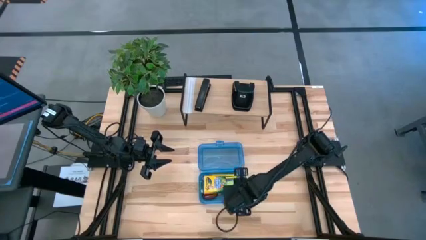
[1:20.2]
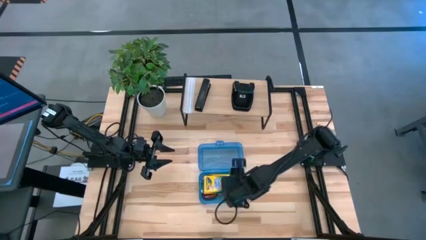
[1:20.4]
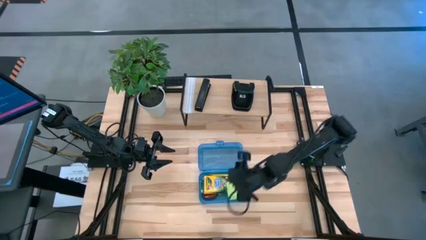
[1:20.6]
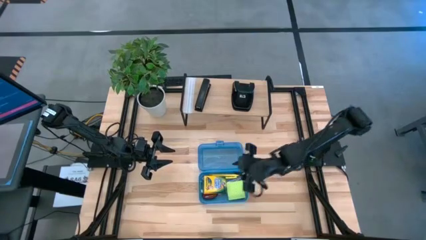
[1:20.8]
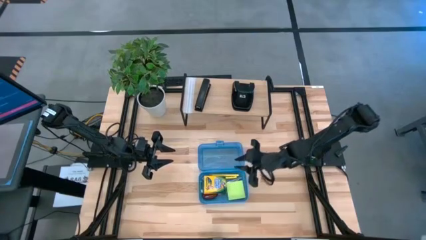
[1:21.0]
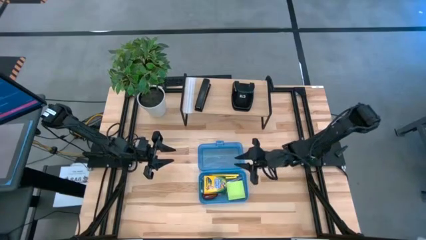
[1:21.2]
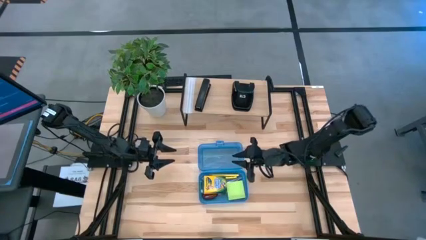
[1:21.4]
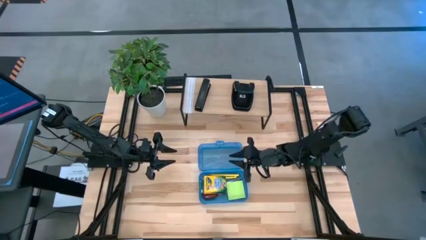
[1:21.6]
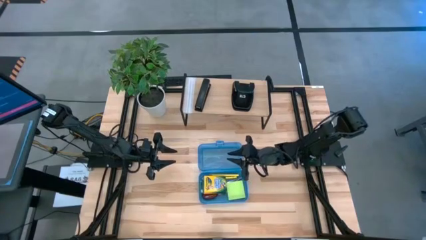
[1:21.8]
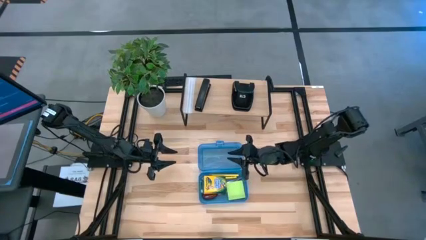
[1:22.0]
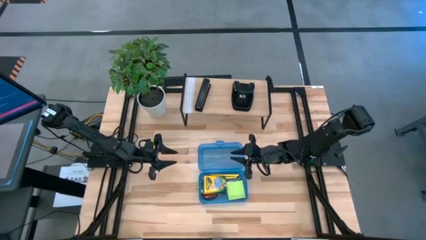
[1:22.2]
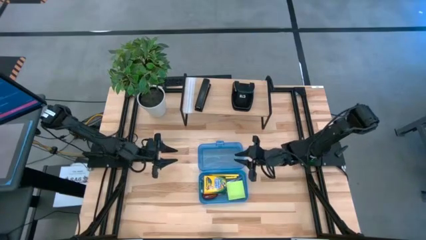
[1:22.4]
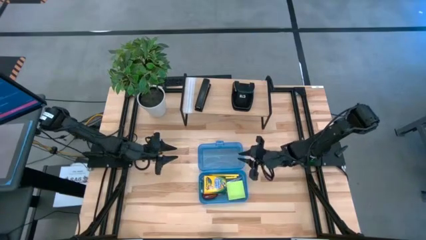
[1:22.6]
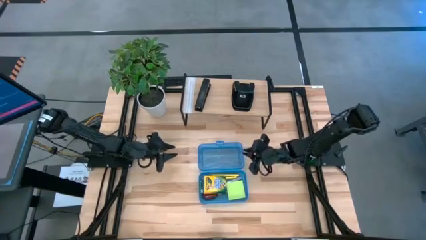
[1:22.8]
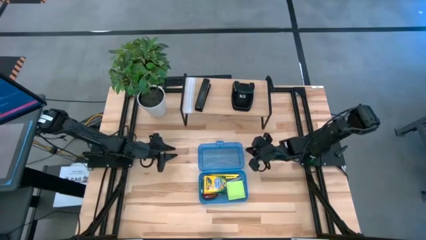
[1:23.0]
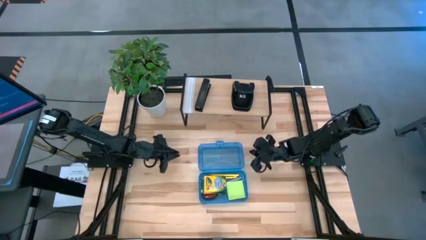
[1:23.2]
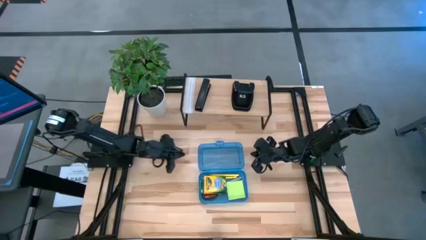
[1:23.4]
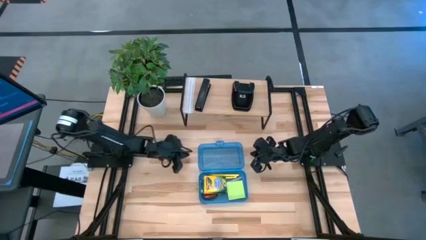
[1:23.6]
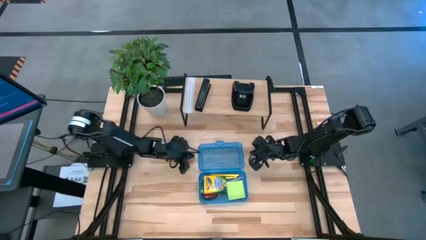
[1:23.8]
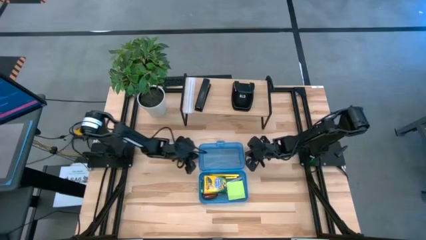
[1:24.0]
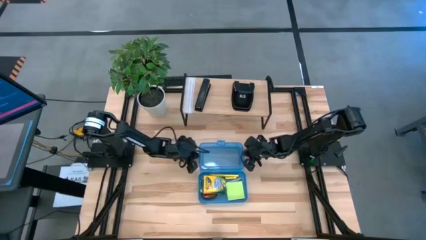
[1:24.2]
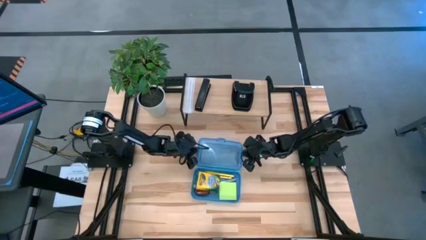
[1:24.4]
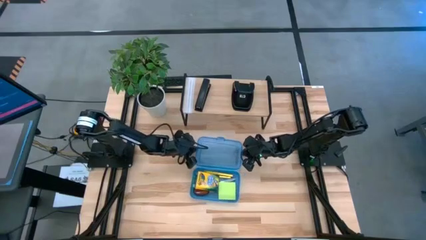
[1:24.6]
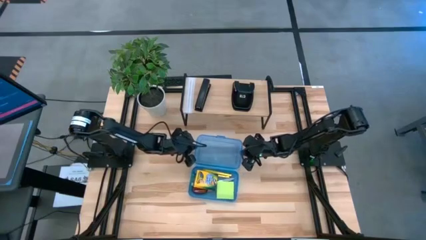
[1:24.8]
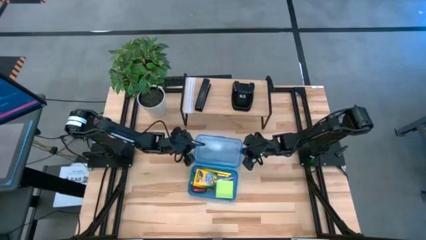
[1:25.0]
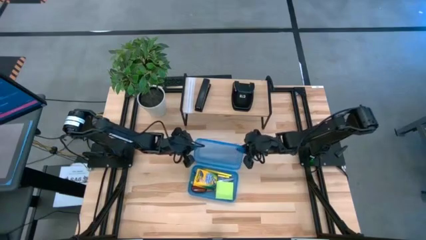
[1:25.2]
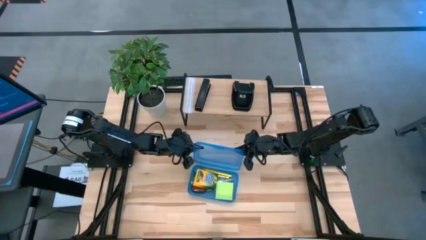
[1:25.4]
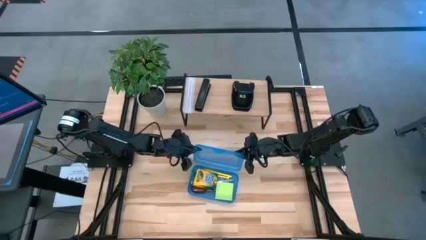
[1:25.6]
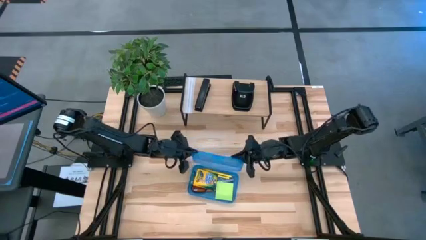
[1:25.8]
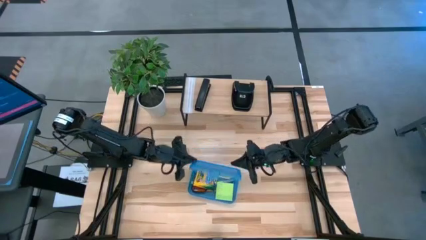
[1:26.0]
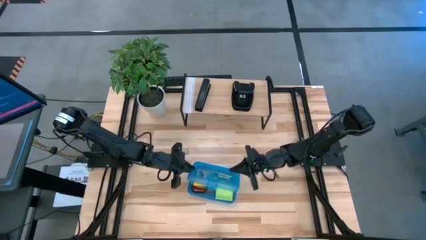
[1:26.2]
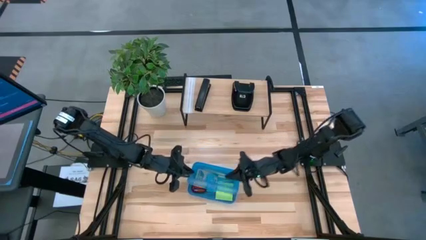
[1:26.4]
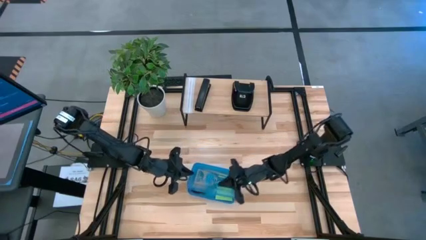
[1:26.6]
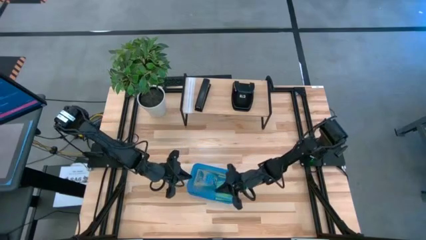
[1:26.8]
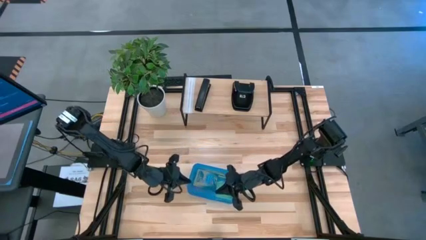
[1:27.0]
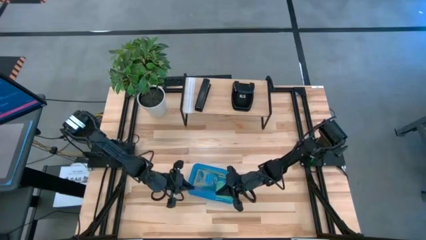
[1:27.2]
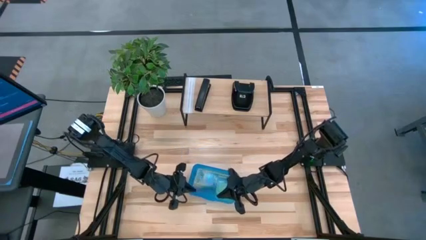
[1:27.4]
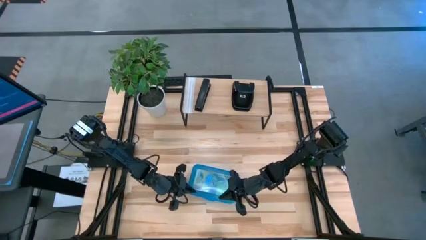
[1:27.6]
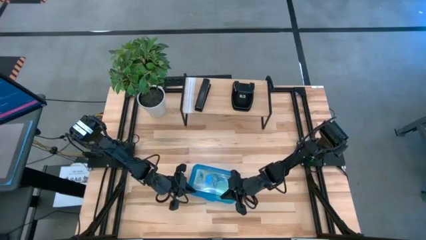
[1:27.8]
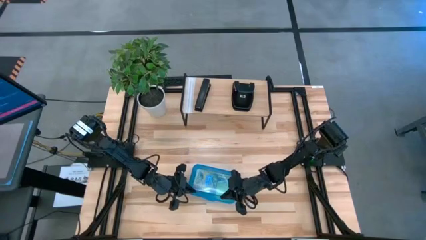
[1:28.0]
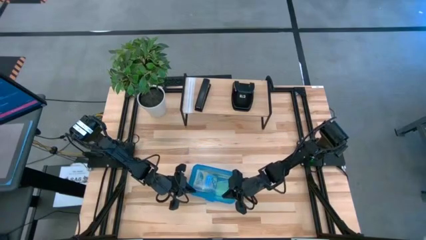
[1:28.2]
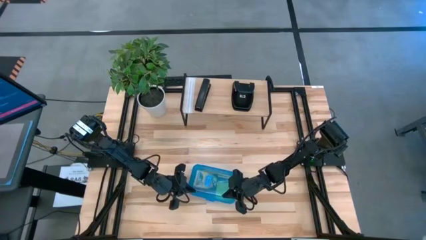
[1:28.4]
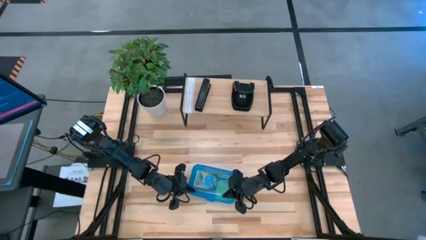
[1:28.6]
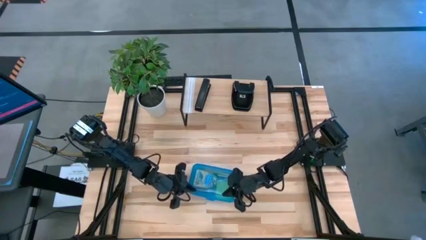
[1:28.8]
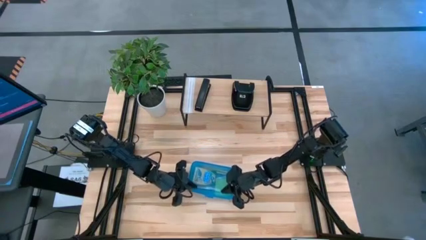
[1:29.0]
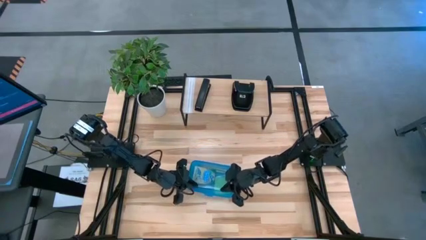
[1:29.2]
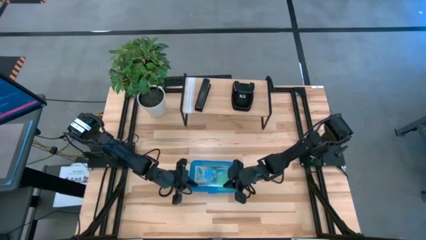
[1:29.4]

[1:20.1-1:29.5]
Task: Pack school essentials
Close the blue supply box

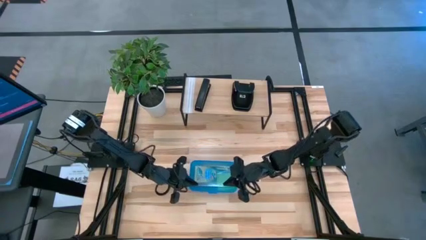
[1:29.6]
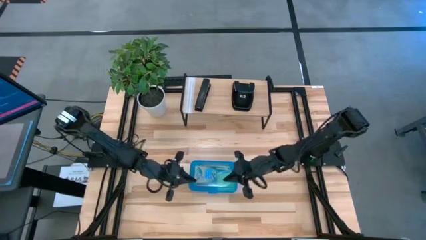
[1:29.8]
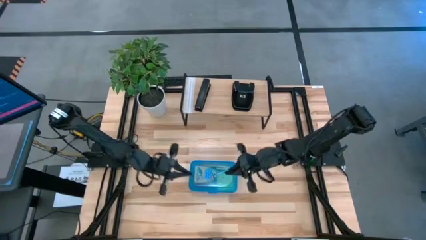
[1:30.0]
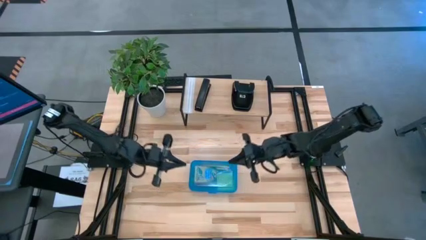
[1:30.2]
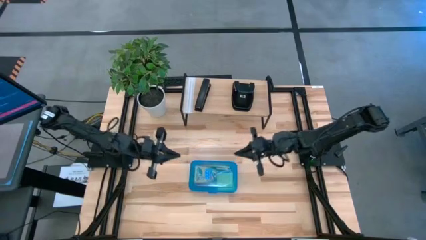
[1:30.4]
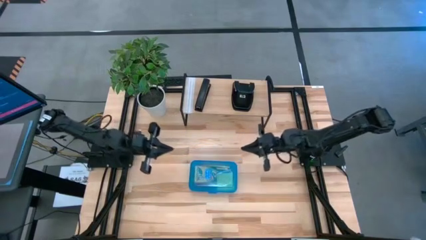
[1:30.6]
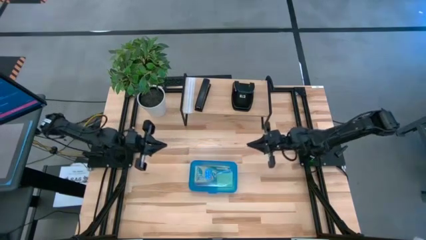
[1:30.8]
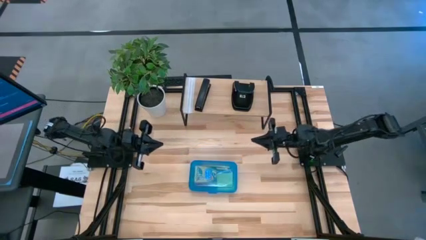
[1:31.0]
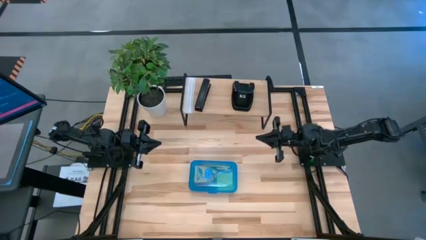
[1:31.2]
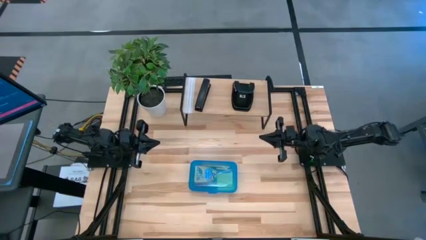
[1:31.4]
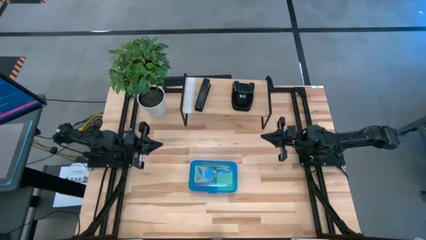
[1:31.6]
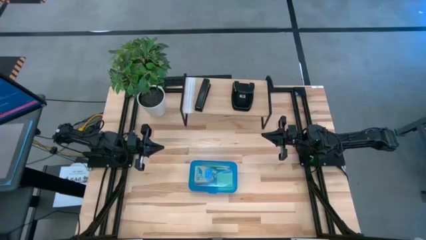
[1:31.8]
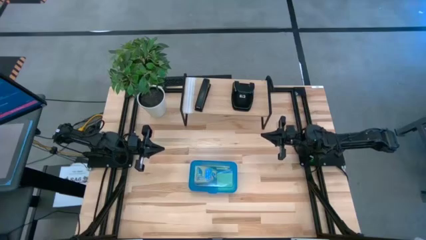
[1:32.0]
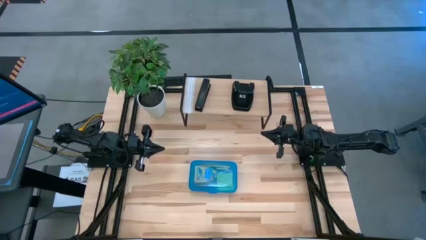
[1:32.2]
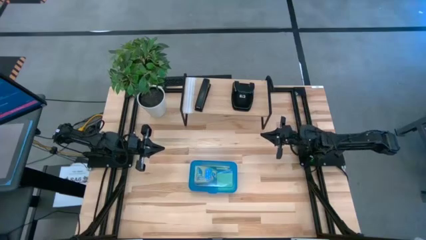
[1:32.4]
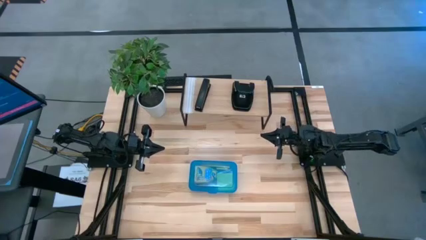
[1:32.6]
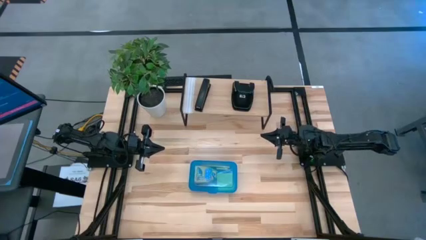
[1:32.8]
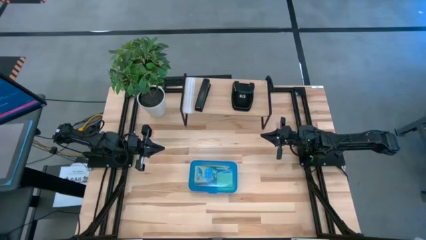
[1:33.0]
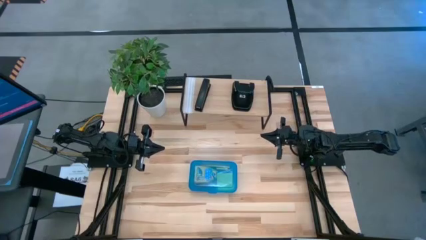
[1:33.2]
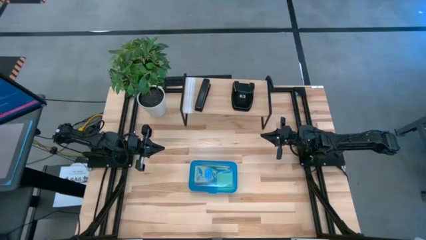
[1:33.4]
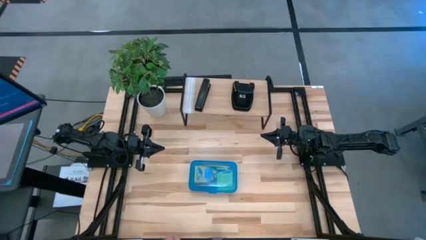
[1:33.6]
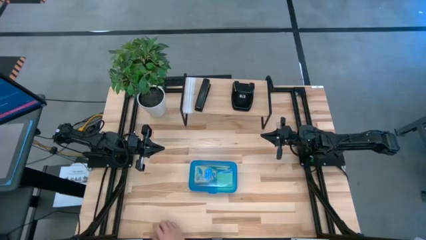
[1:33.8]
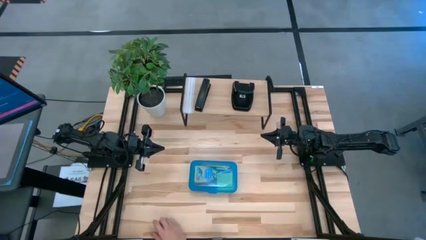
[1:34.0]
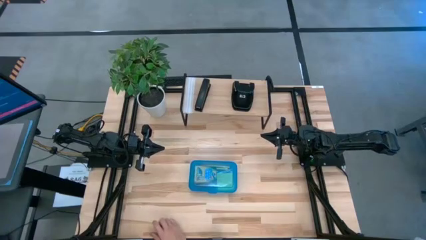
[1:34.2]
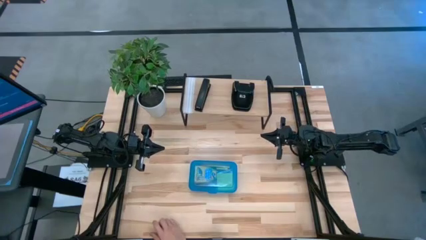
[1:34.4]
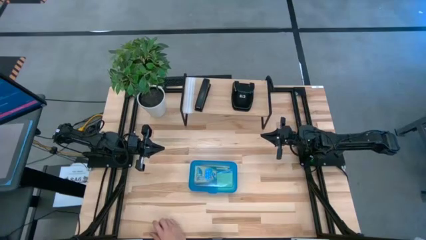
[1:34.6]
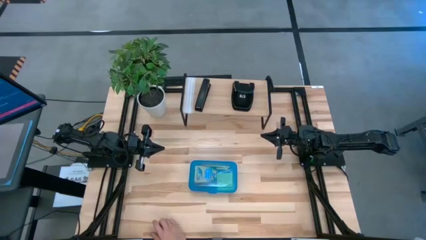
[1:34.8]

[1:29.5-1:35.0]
Return to Home Position
